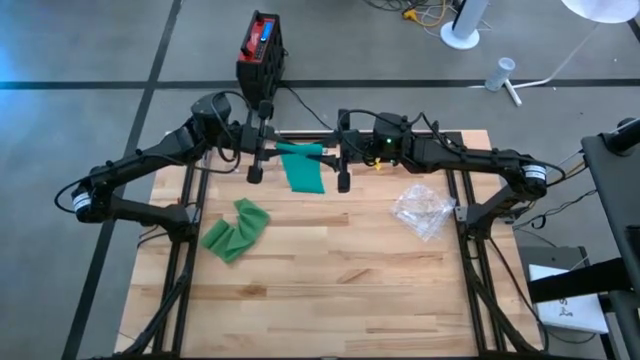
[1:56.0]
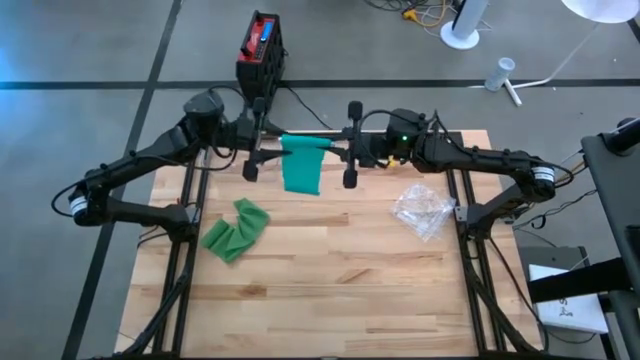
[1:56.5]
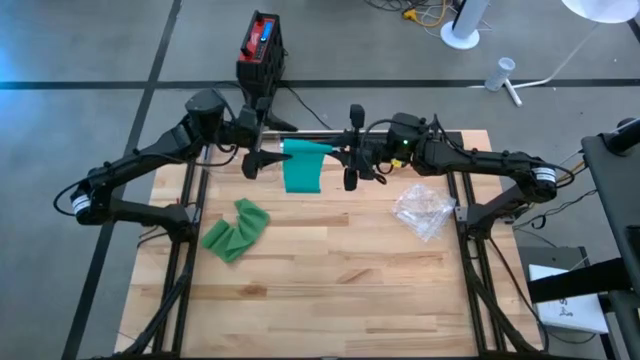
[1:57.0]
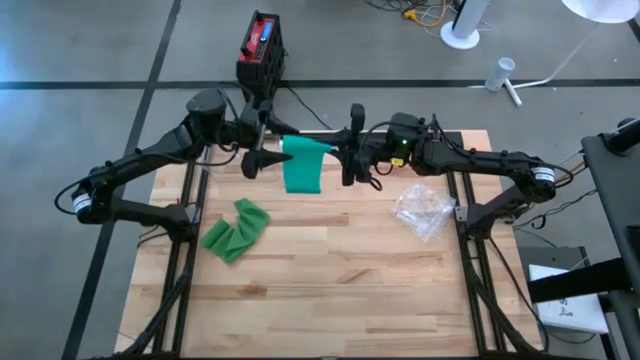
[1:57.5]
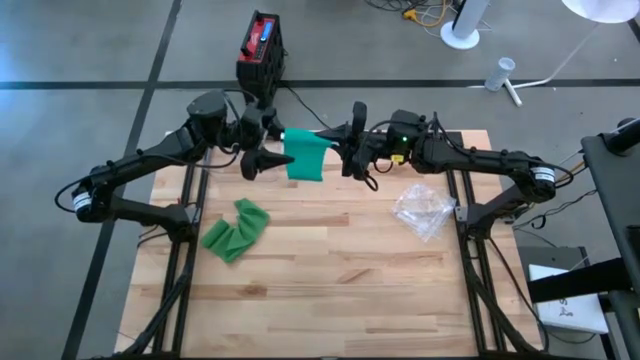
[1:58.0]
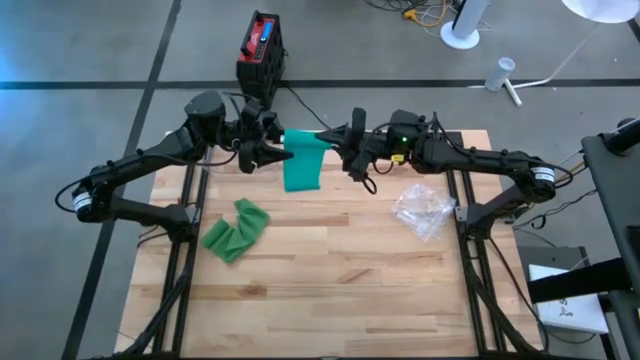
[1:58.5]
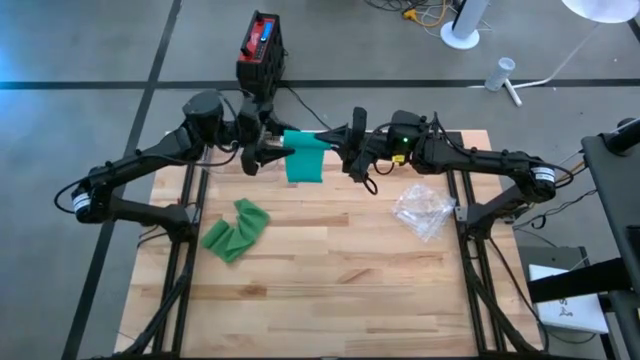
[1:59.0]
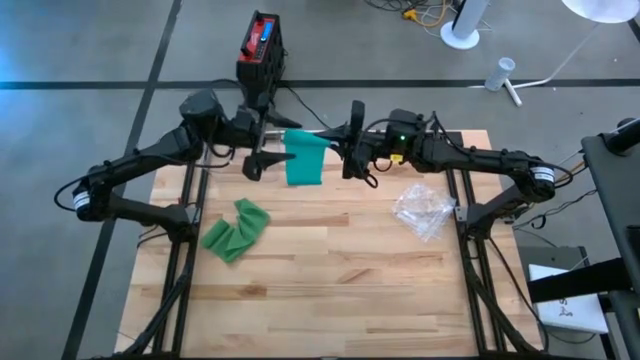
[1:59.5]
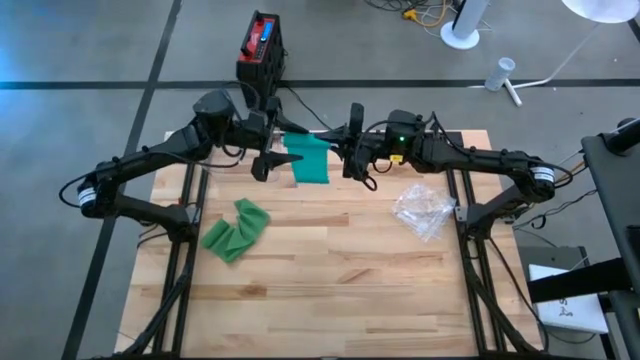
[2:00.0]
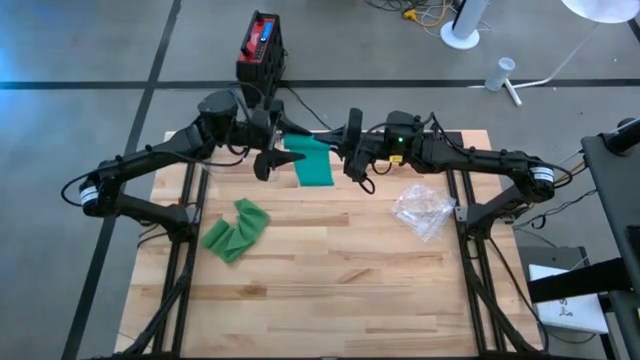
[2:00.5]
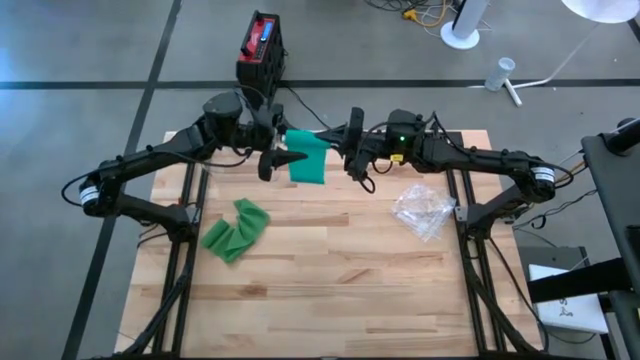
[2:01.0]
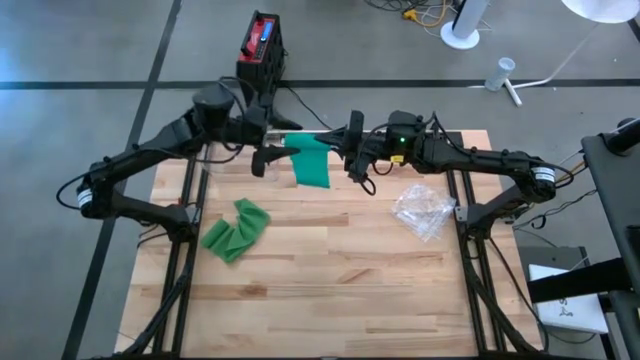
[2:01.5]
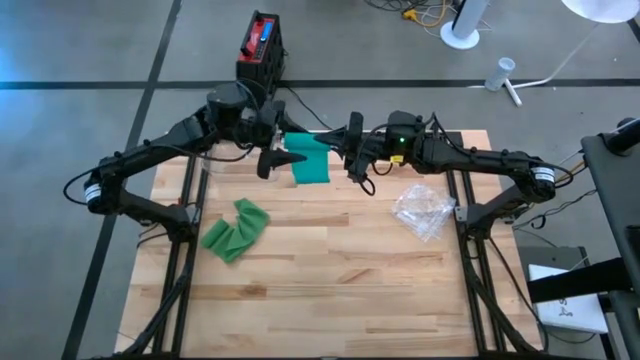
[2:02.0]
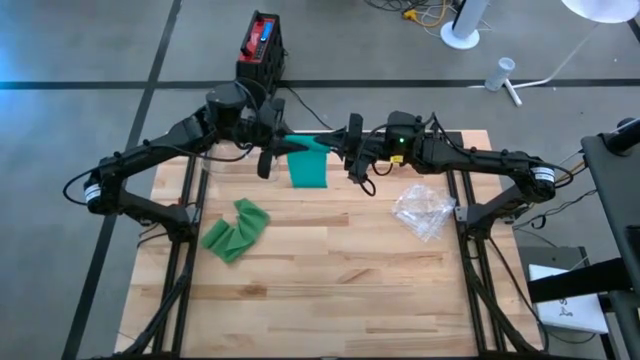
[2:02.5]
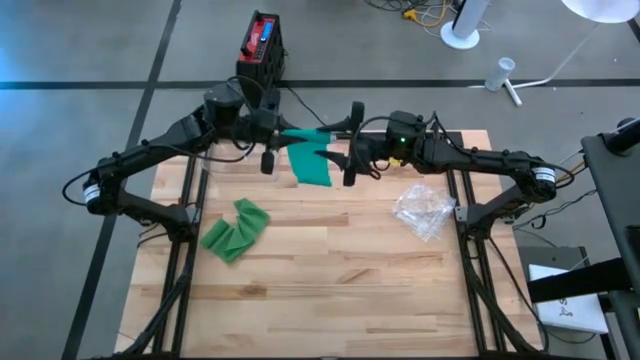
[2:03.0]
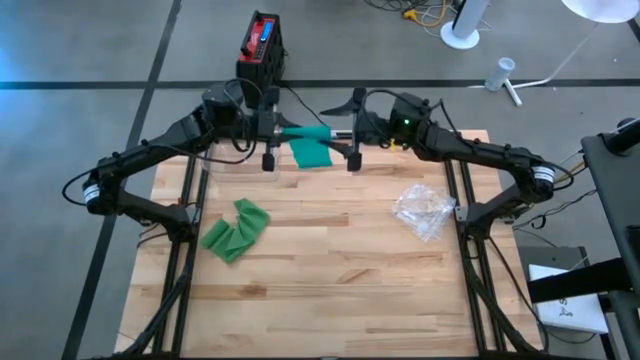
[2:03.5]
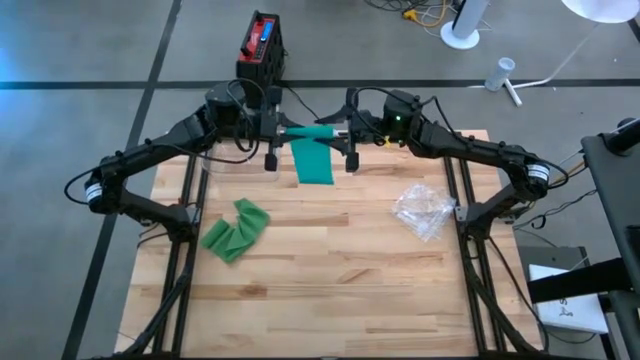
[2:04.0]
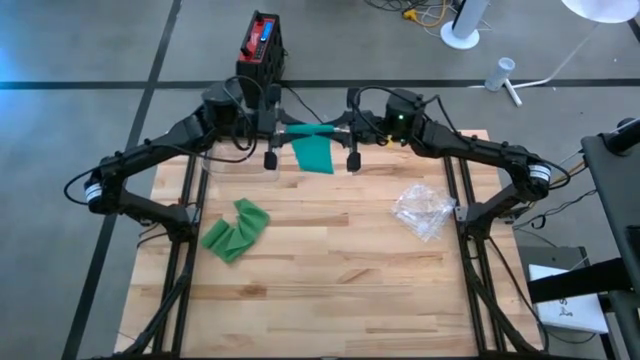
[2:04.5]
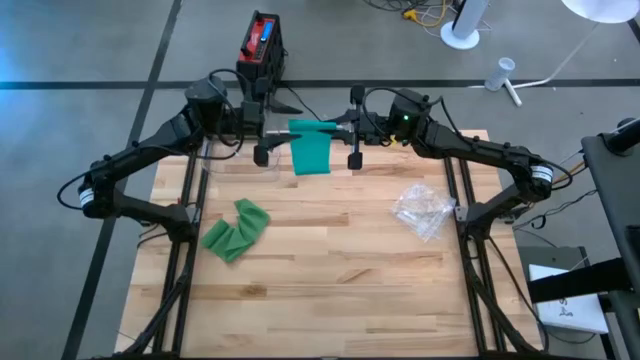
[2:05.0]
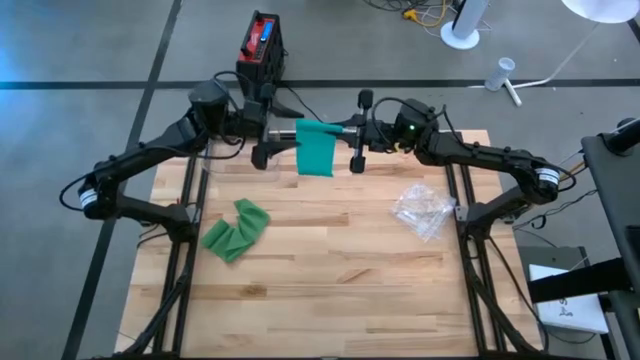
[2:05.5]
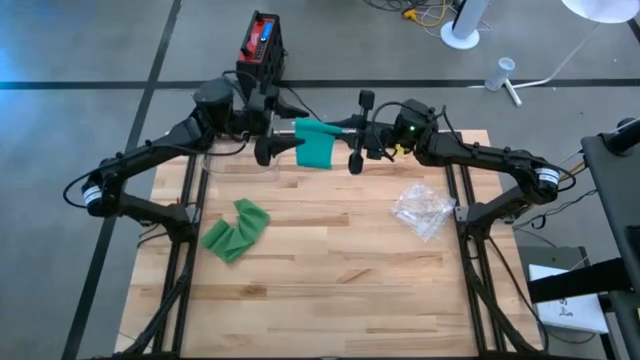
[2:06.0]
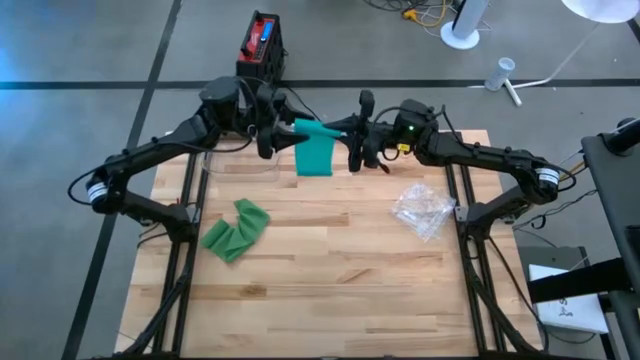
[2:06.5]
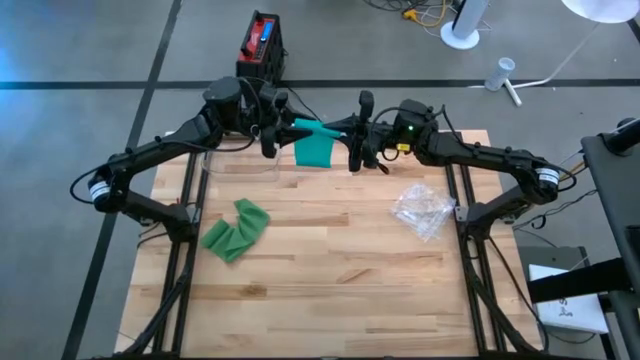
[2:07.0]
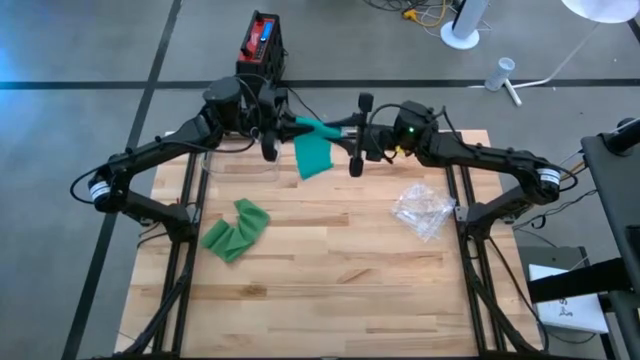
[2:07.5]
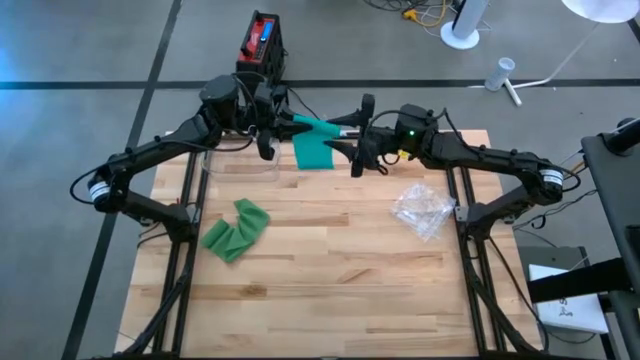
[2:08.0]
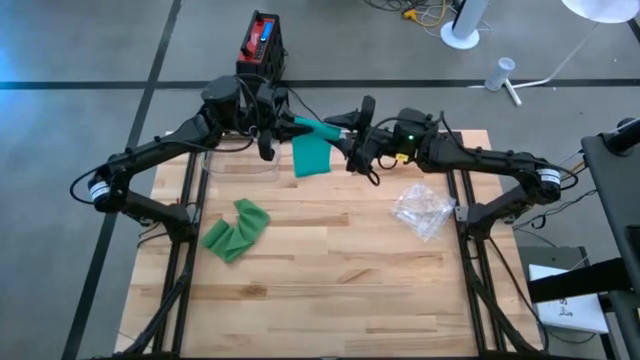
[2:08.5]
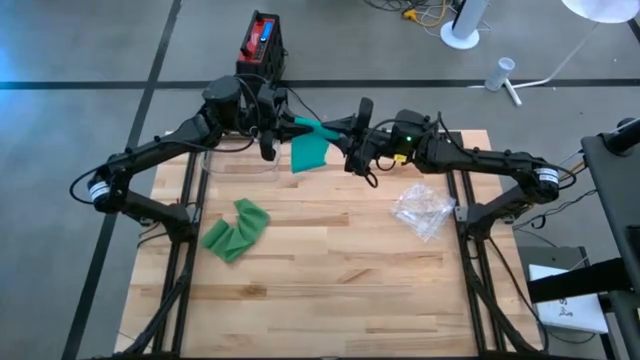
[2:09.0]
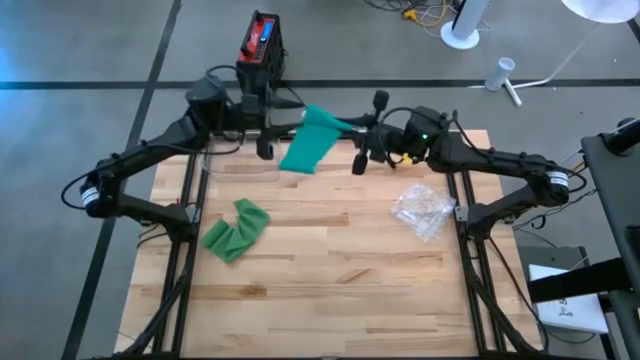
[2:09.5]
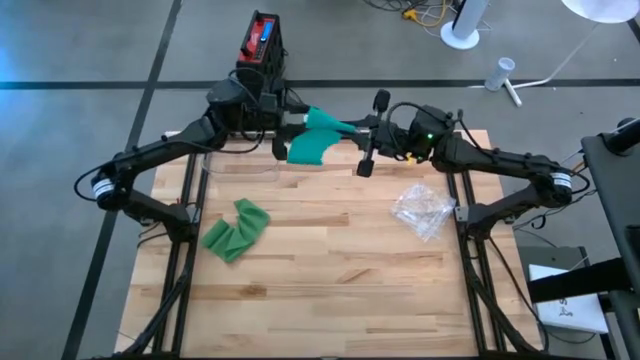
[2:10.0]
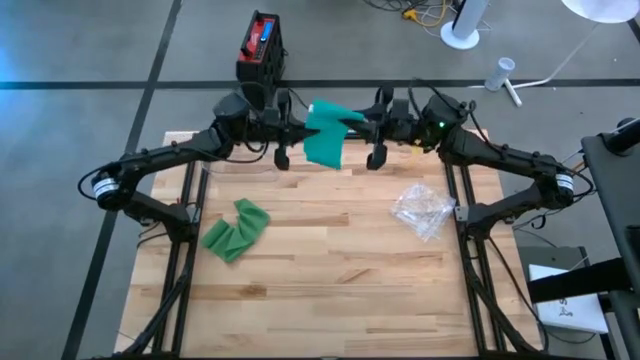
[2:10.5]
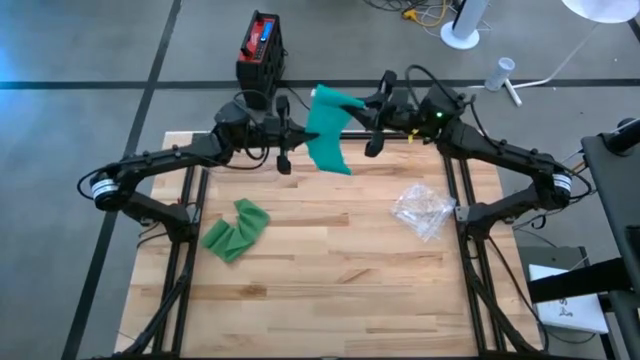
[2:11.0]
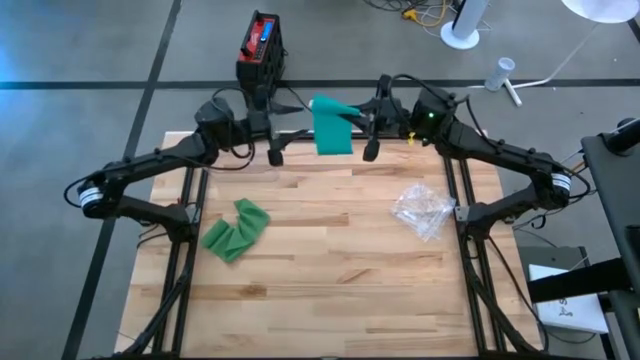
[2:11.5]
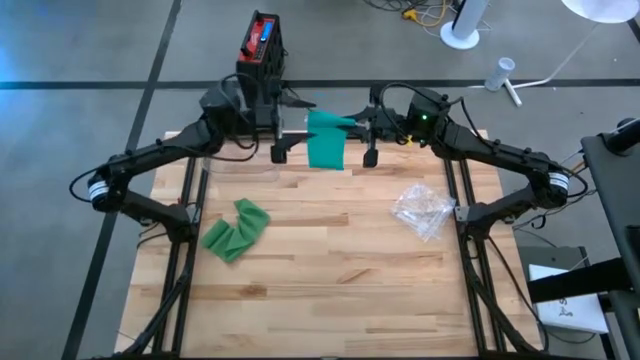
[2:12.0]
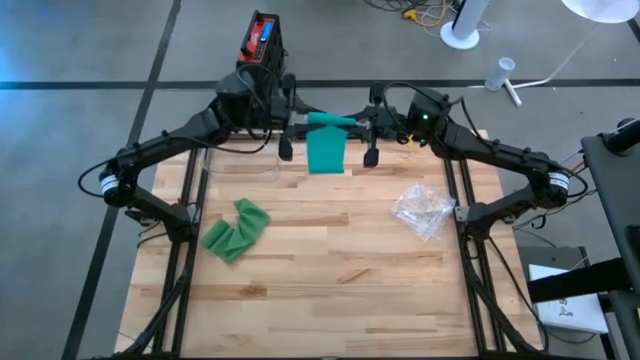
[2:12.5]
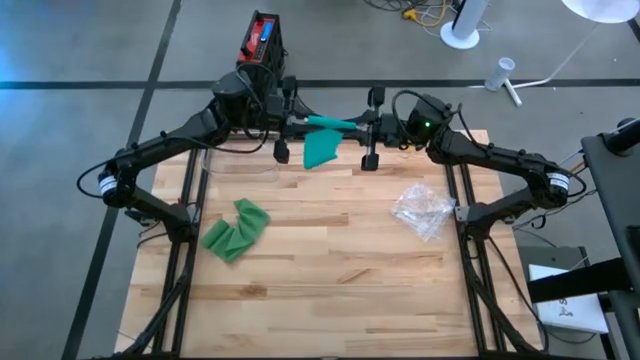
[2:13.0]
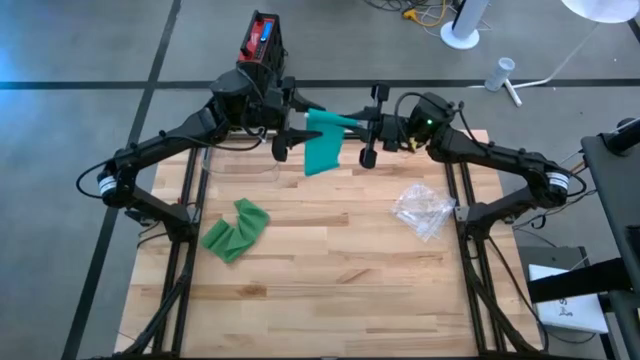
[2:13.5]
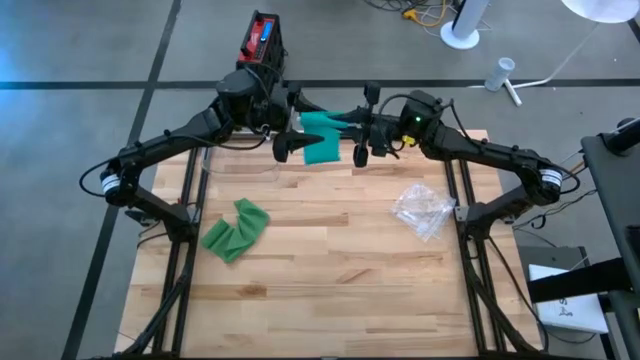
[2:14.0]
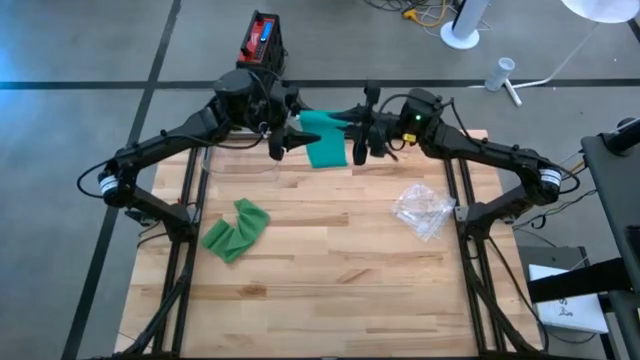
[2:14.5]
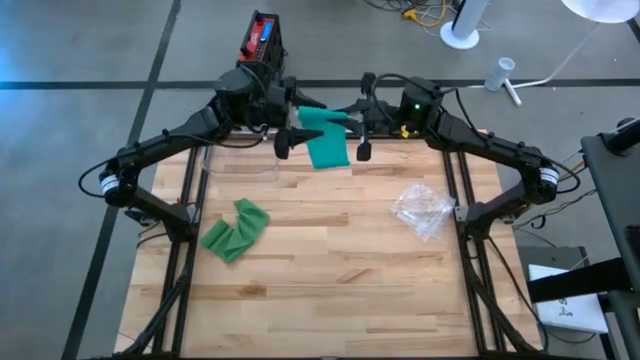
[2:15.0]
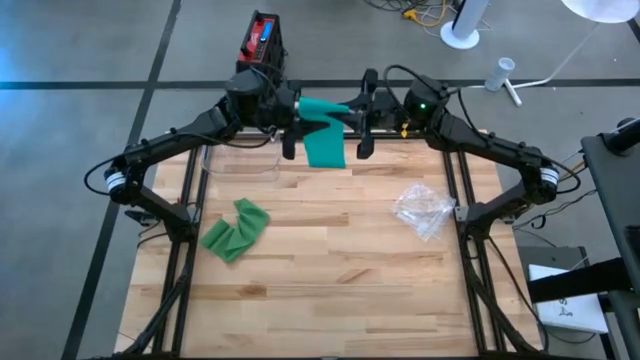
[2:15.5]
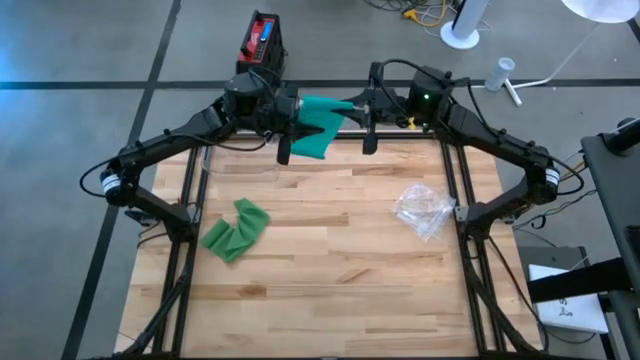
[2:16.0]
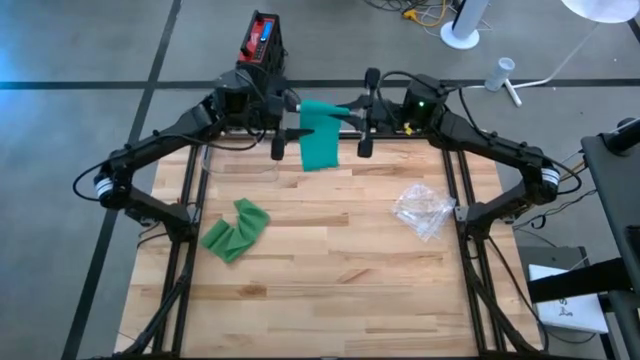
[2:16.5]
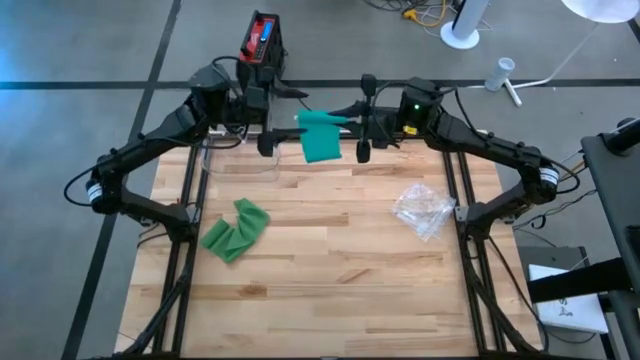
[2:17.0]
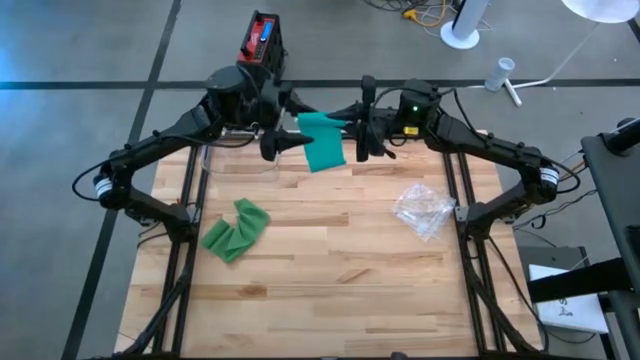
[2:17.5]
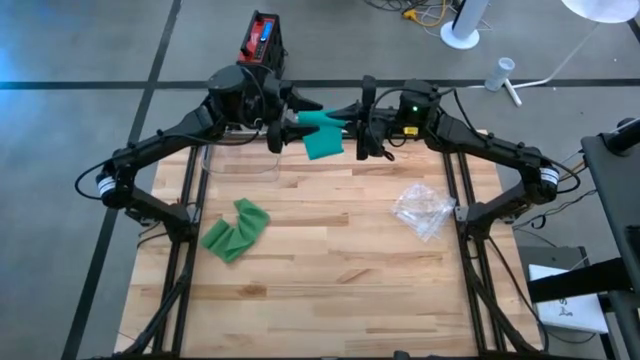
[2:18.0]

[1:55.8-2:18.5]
Task: Roll bandage
Roll the blue bandage
